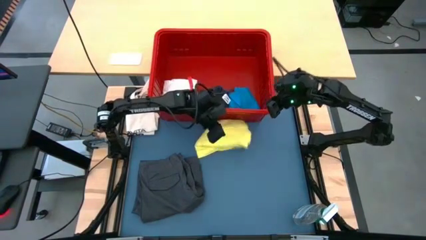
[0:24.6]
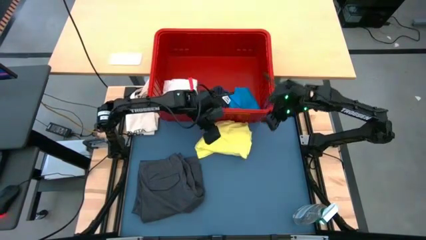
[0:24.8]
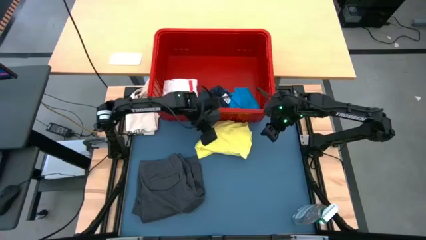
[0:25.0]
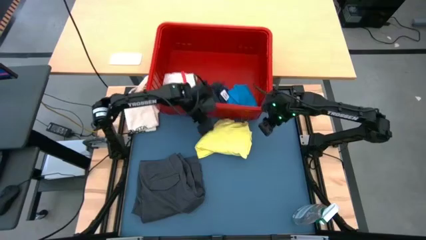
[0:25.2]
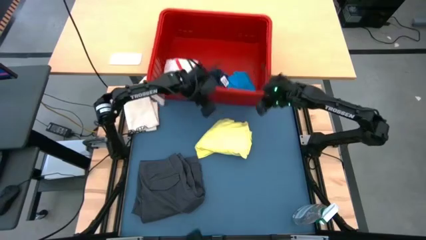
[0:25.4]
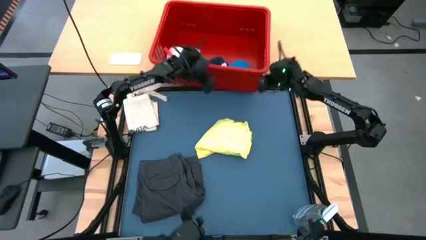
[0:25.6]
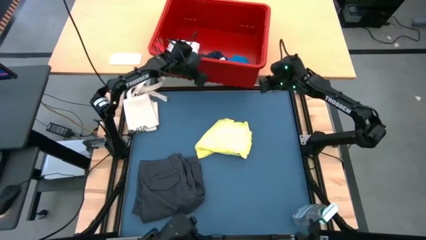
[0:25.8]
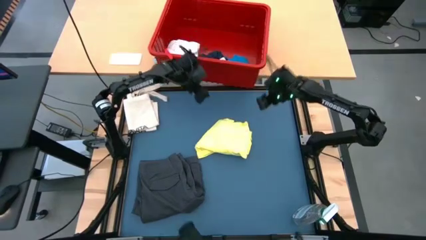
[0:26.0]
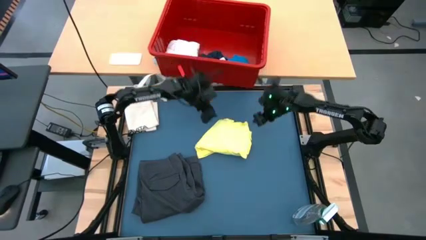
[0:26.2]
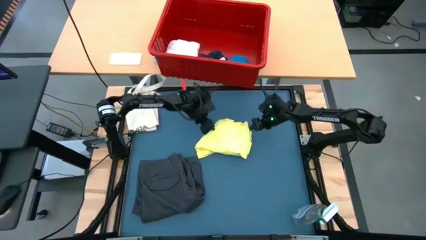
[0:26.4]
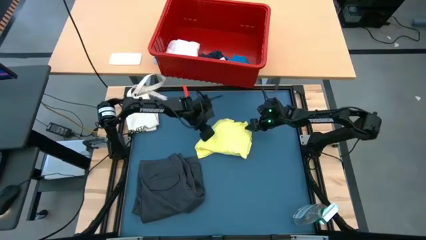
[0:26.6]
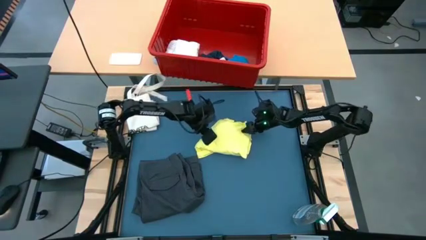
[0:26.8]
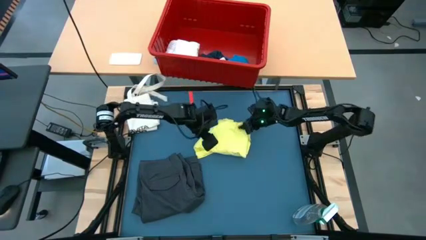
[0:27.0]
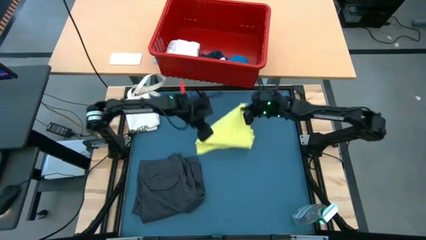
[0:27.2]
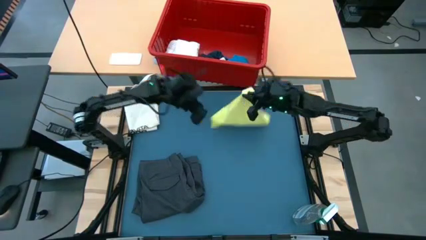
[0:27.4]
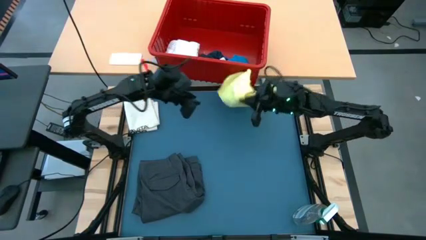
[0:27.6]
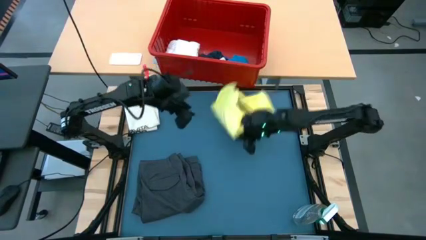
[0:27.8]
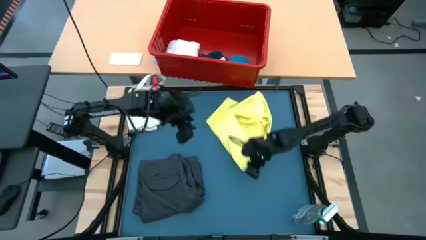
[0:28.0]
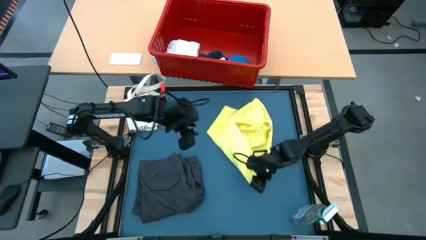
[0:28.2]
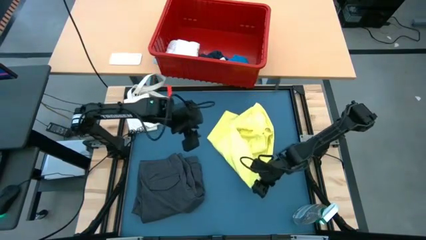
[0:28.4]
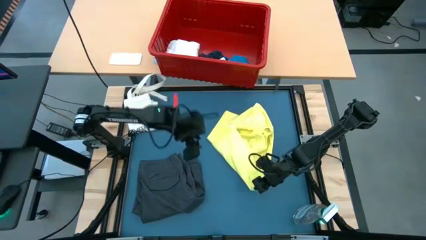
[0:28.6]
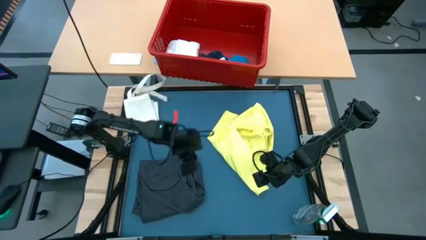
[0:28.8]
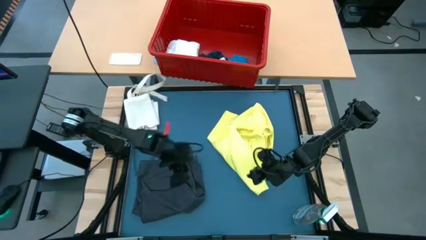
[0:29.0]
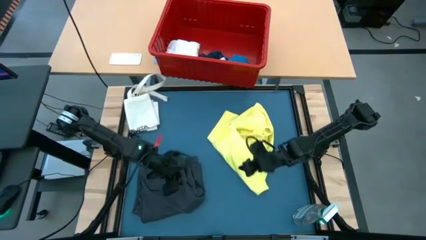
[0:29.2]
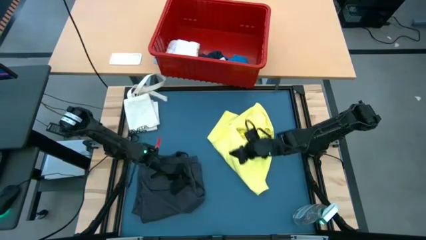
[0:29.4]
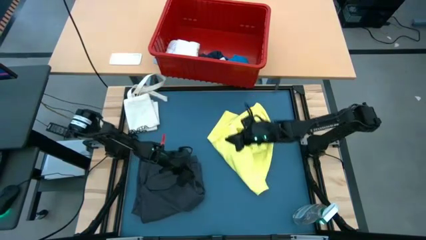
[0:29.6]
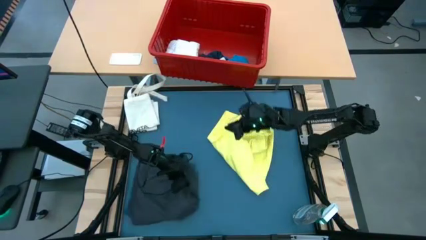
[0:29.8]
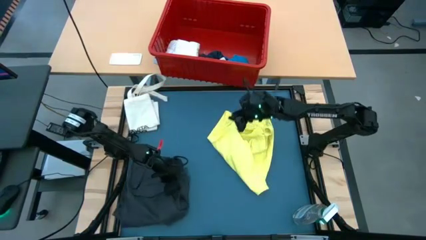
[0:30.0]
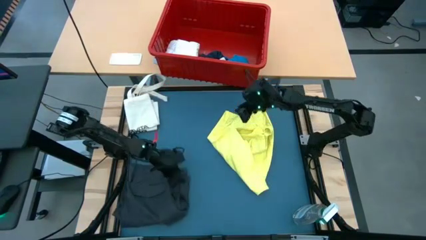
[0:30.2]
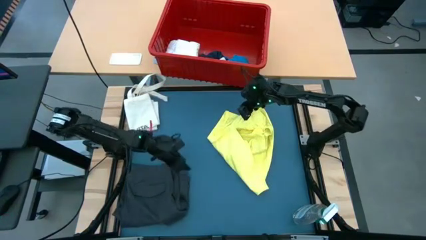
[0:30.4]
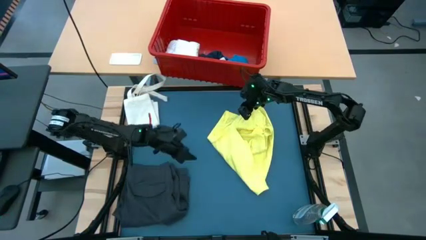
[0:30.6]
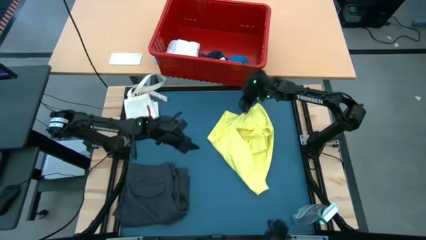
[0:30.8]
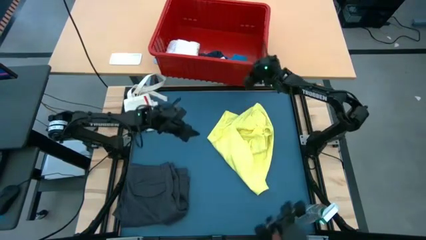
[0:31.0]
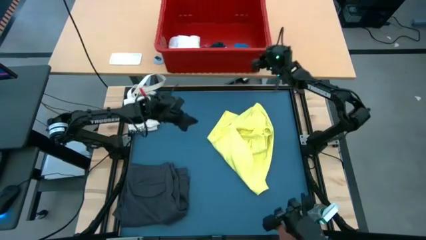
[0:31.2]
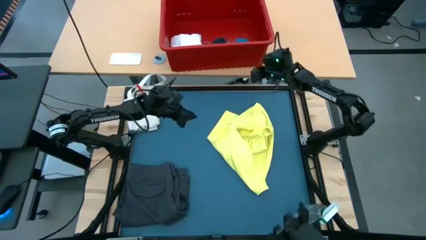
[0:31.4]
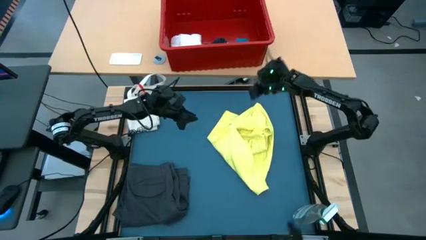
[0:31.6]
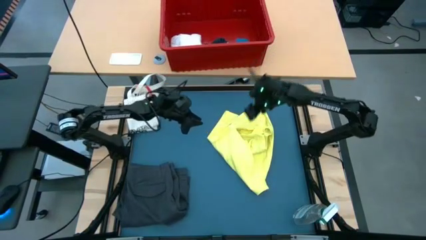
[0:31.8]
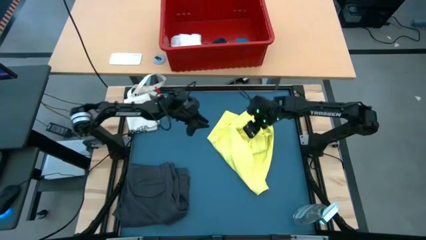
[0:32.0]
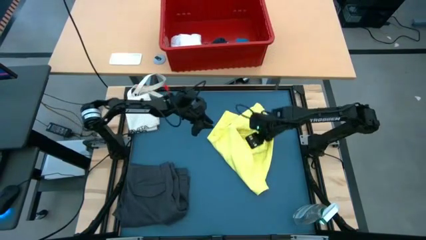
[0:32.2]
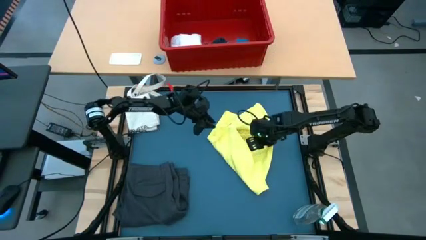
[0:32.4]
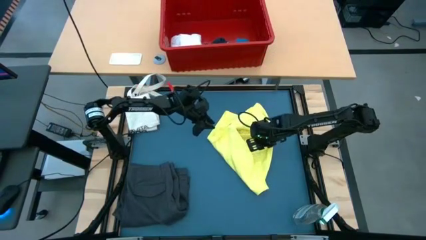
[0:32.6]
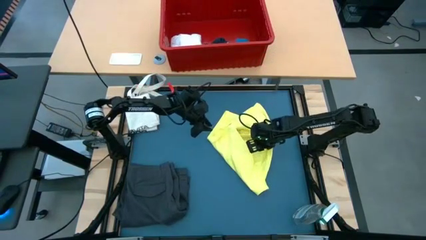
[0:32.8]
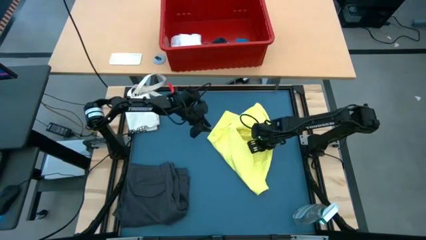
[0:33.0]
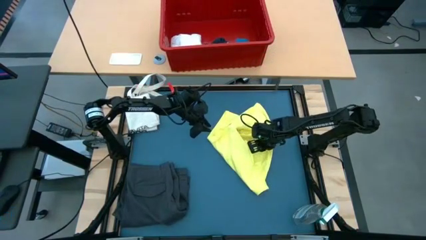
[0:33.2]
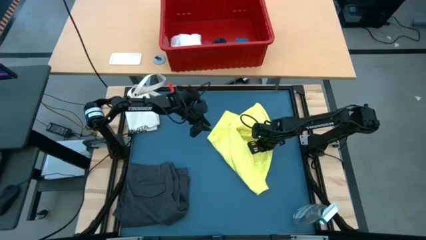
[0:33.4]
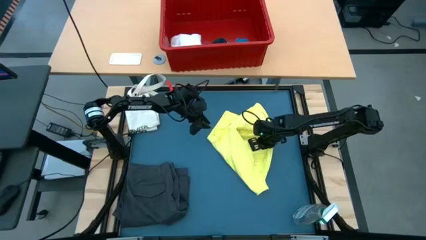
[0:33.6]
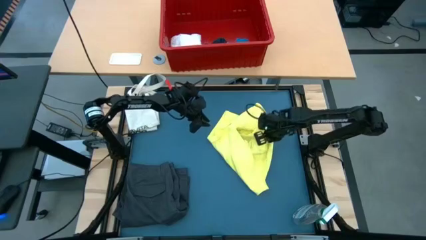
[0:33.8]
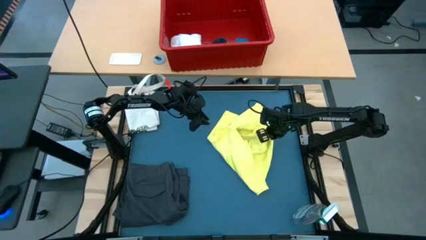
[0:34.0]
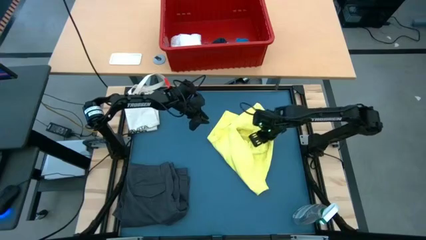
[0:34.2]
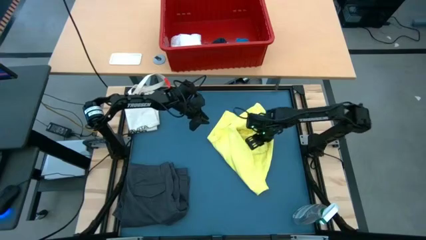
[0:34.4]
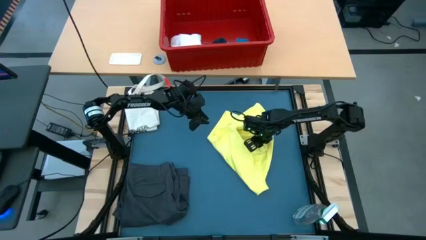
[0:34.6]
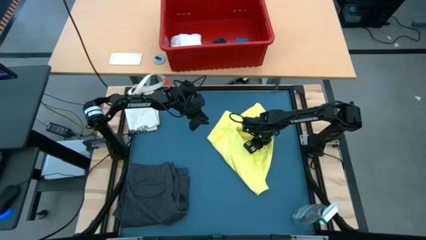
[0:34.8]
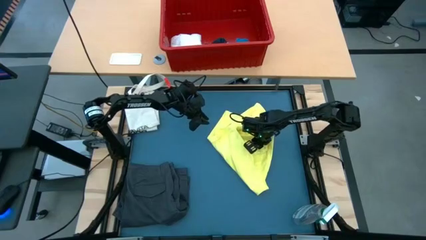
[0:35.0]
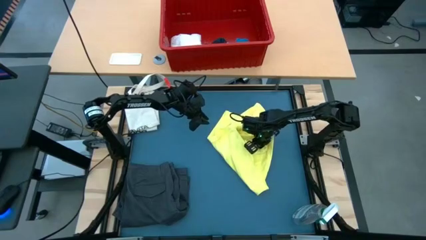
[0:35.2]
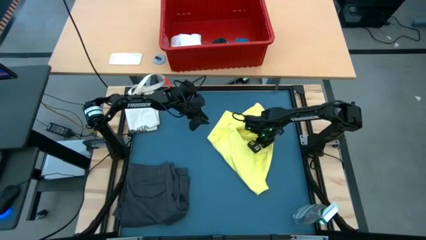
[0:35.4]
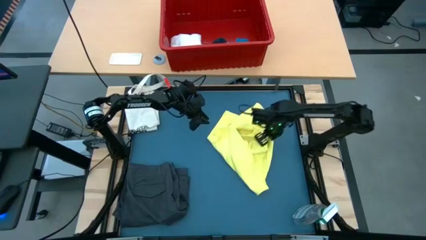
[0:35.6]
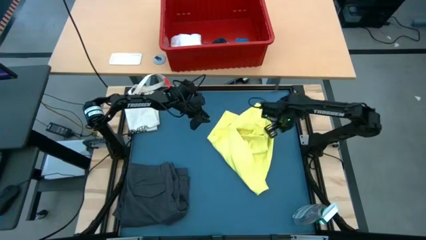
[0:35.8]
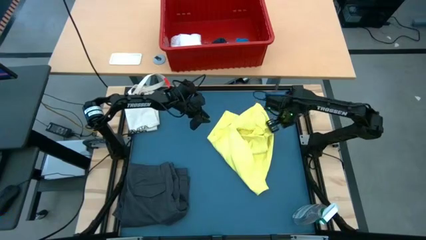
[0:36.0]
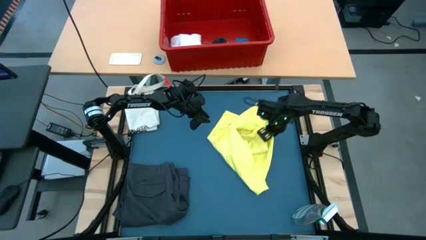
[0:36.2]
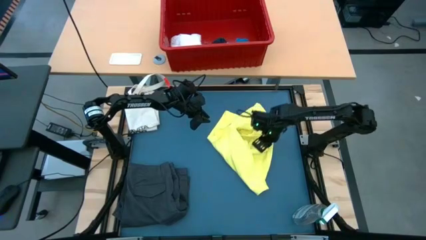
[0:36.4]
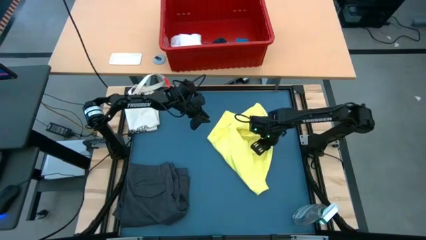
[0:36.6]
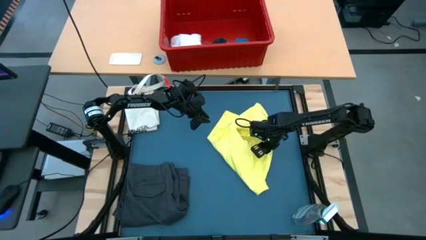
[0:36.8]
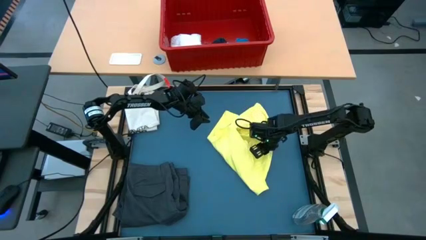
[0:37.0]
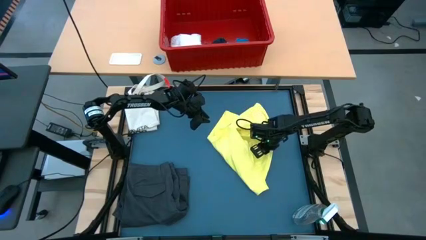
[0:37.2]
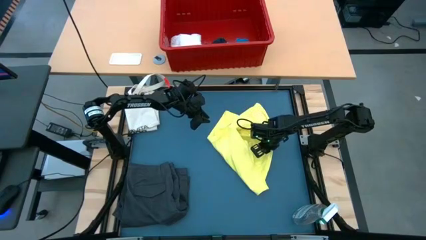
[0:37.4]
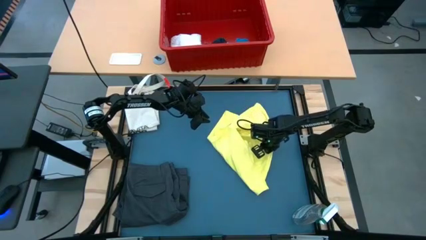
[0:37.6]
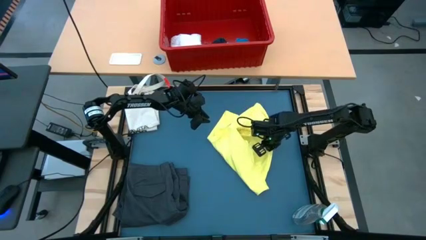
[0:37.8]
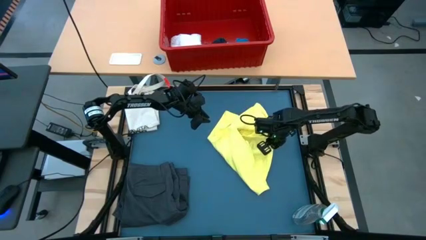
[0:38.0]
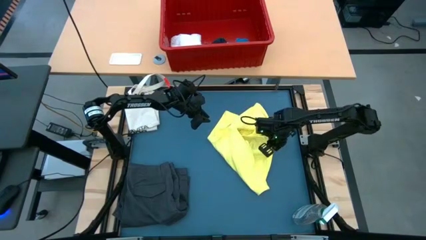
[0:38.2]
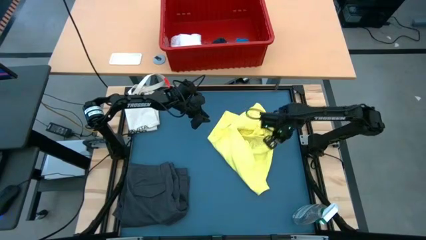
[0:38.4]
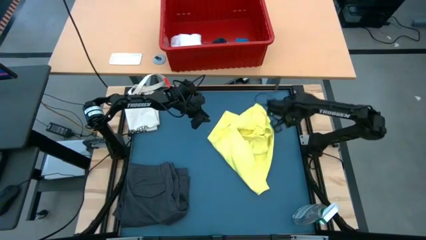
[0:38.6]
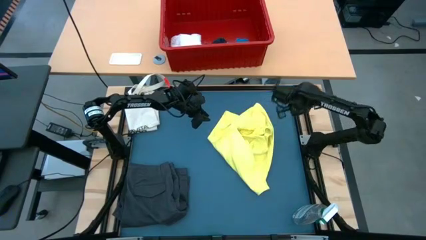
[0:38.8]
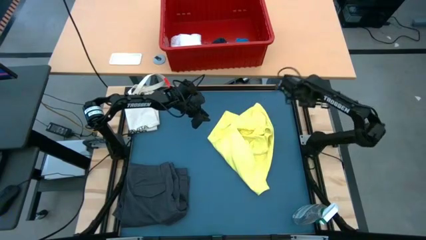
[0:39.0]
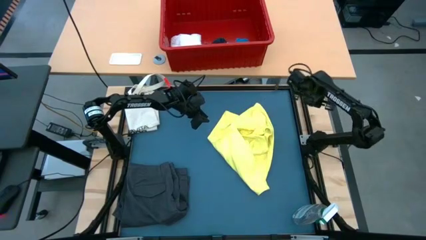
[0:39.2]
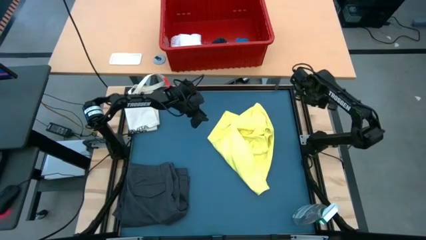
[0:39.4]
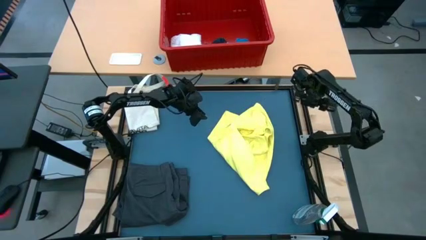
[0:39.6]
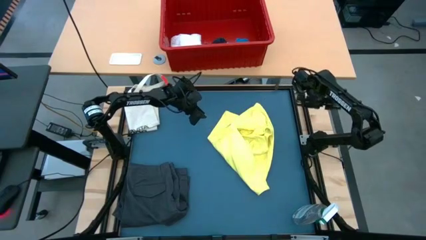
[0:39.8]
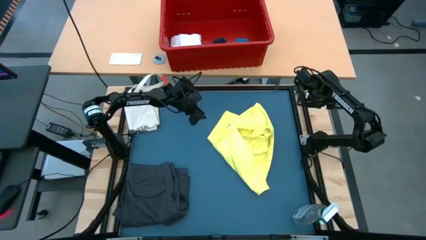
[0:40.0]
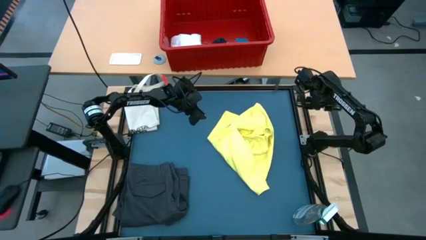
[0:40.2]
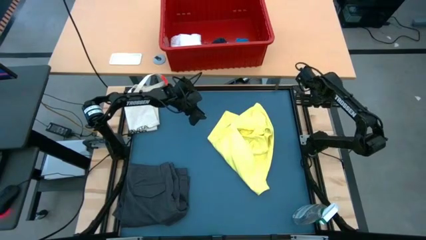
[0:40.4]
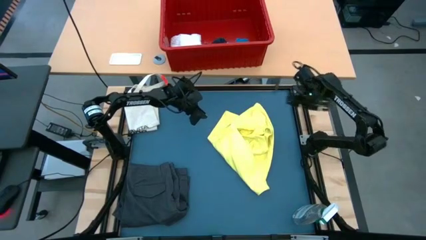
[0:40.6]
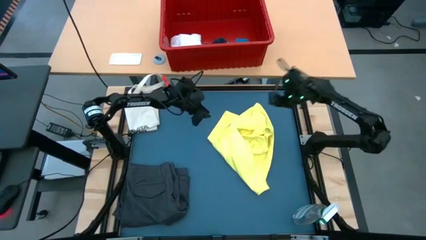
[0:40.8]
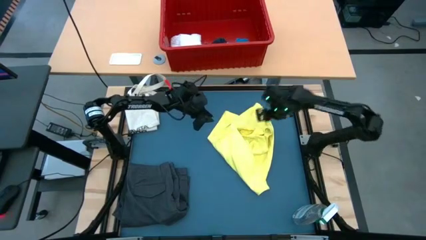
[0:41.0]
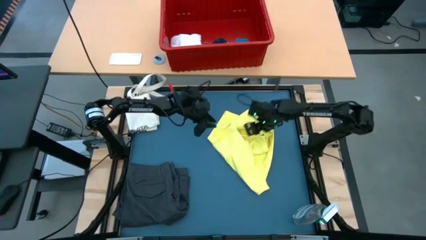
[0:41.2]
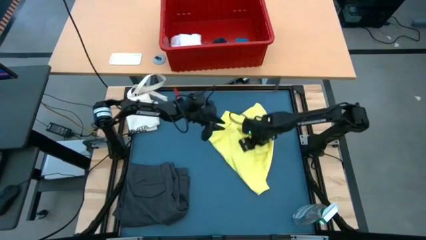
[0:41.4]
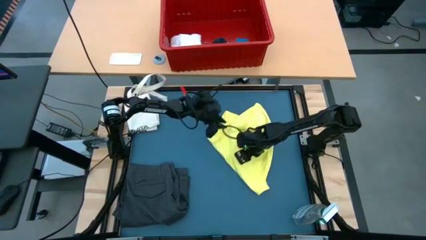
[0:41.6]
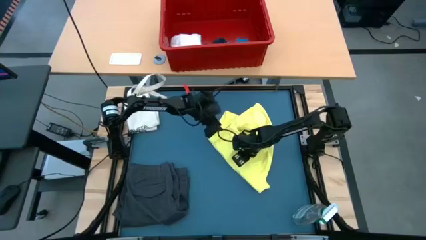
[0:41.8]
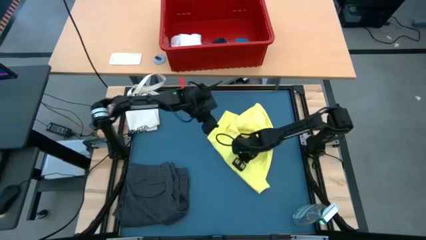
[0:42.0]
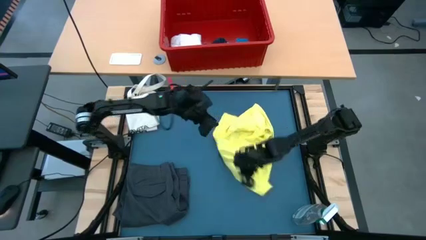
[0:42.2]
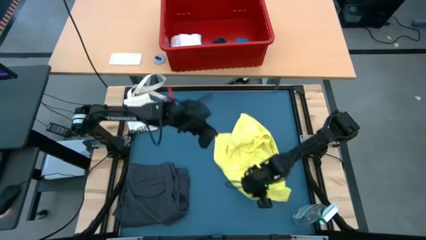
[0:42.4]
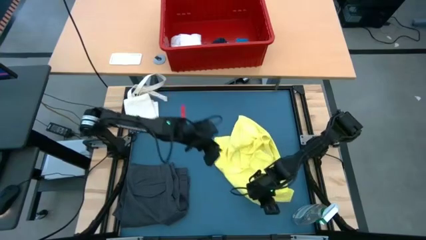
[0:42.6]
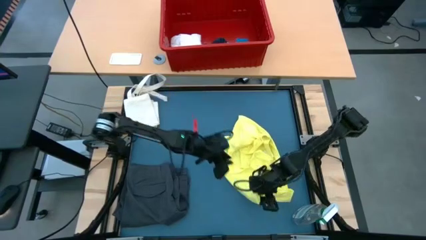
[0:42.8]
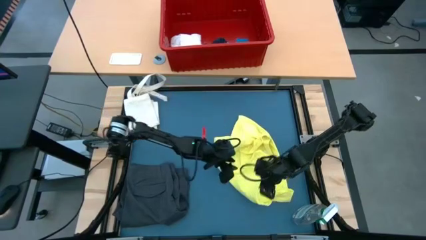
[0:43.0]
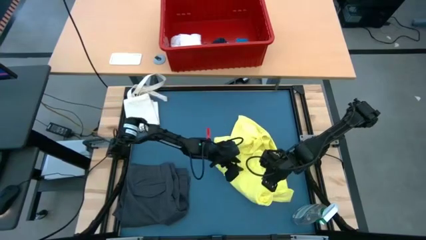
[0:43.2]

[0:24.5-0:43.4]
Task: Fold laundry
Fold the yellow shirt
